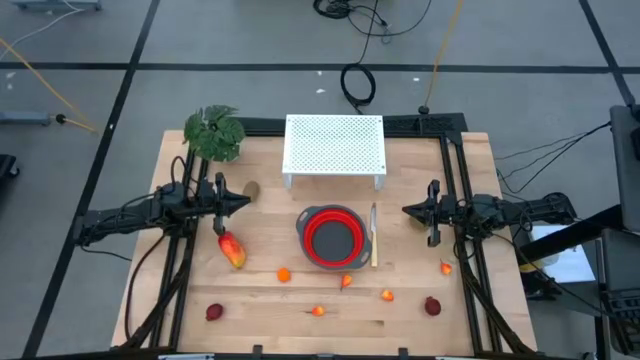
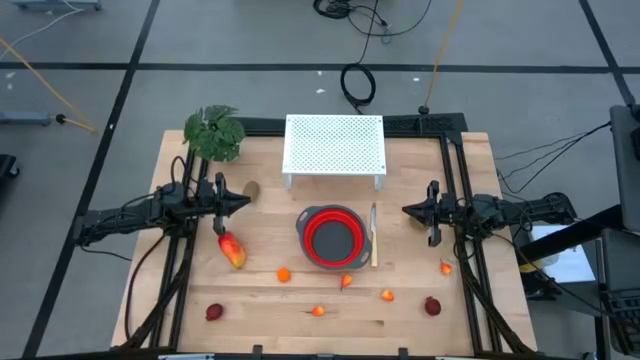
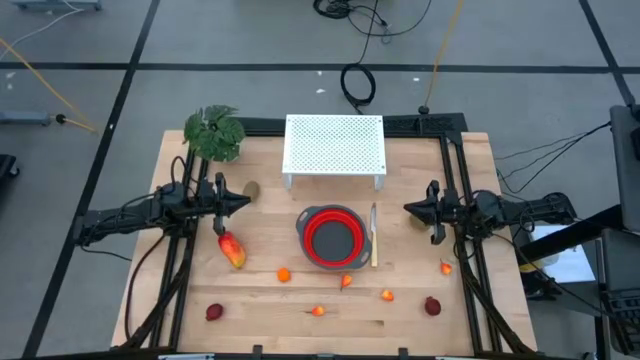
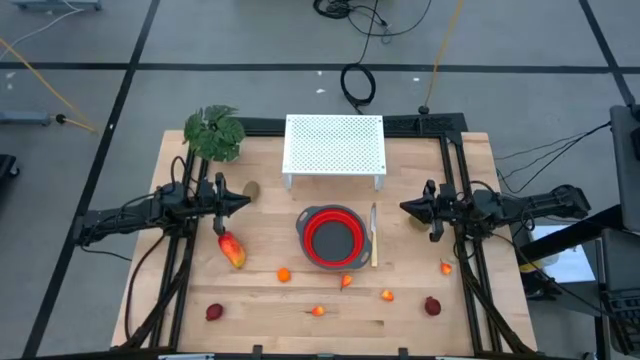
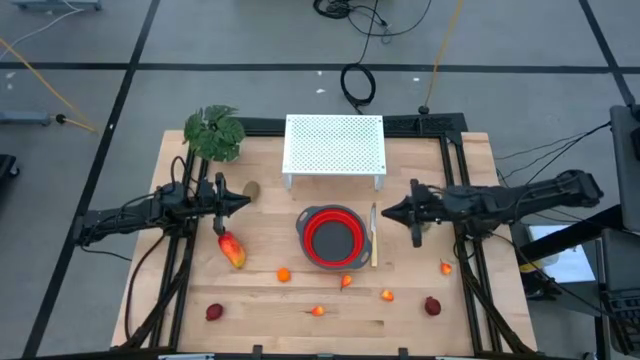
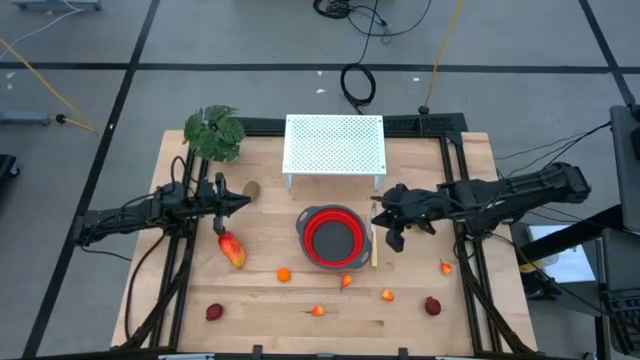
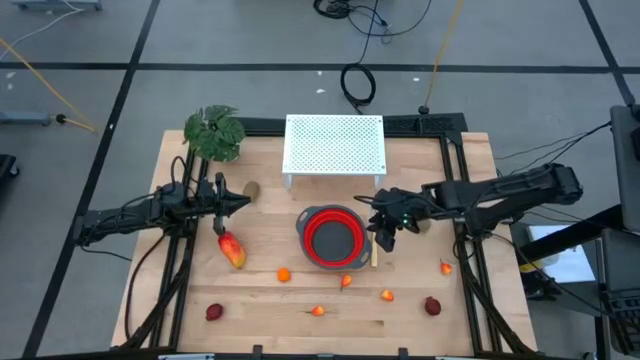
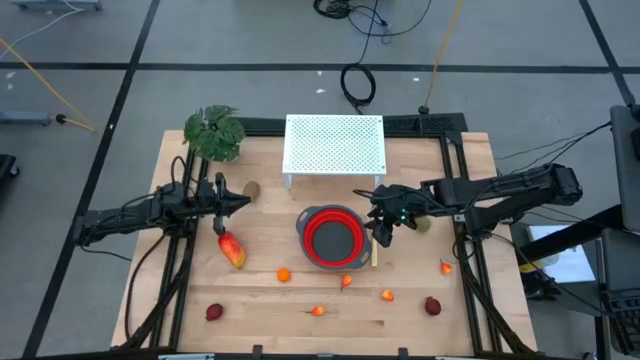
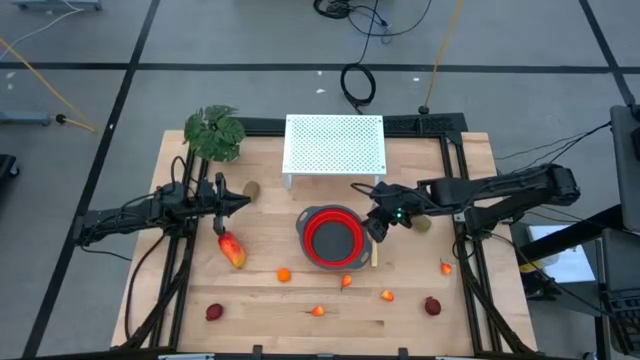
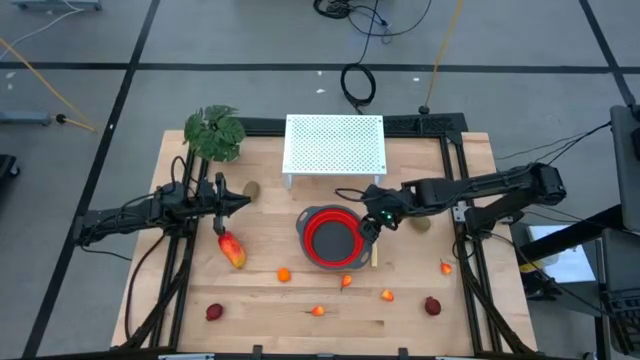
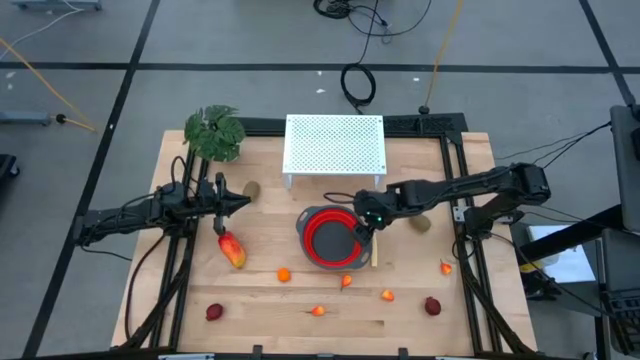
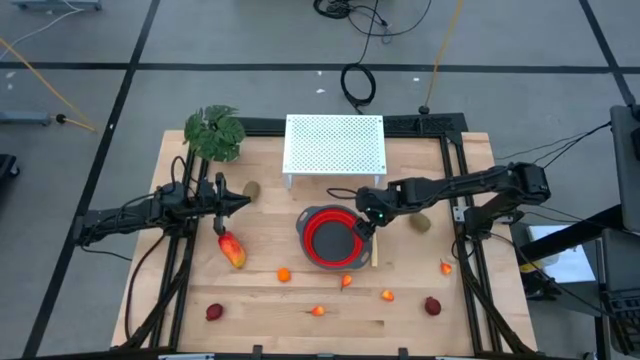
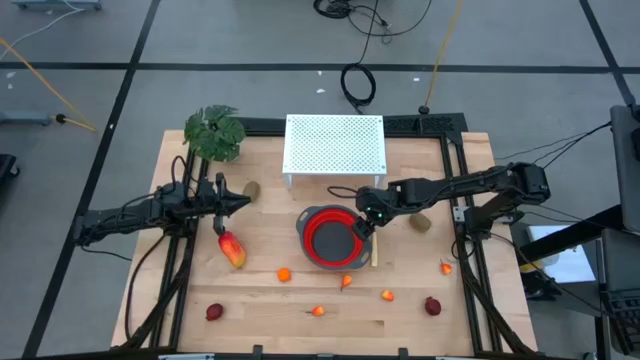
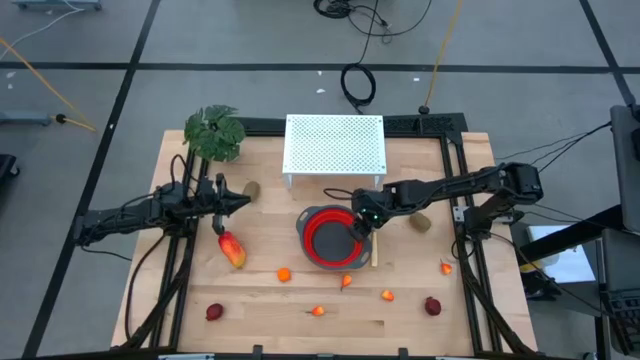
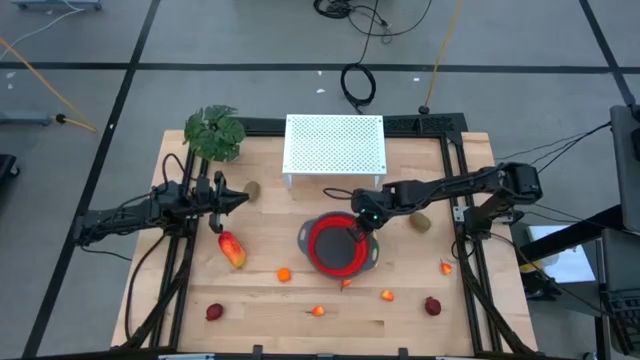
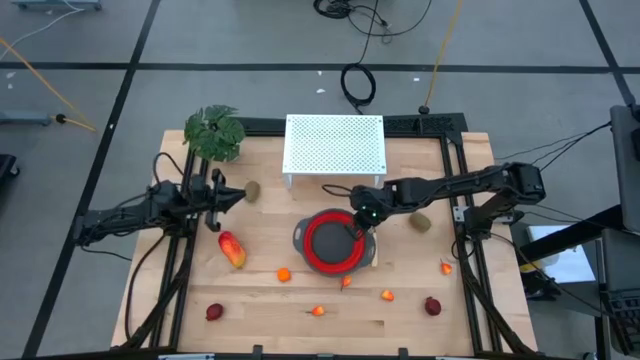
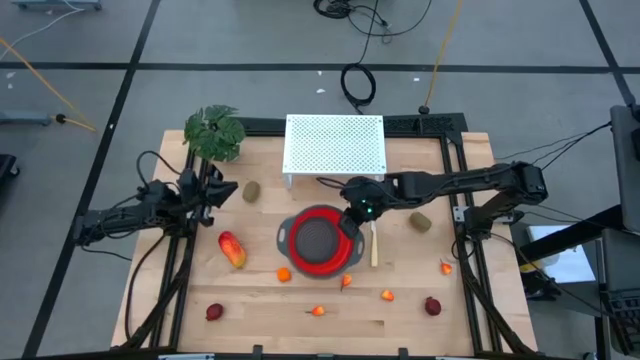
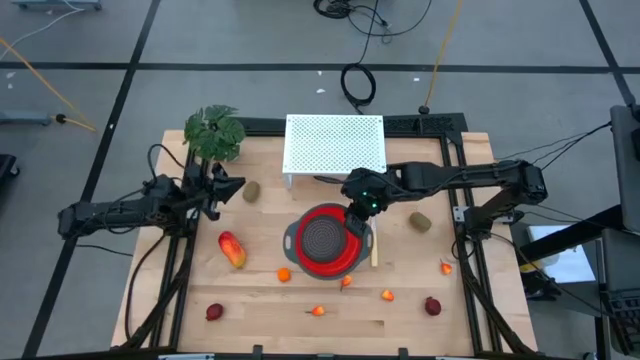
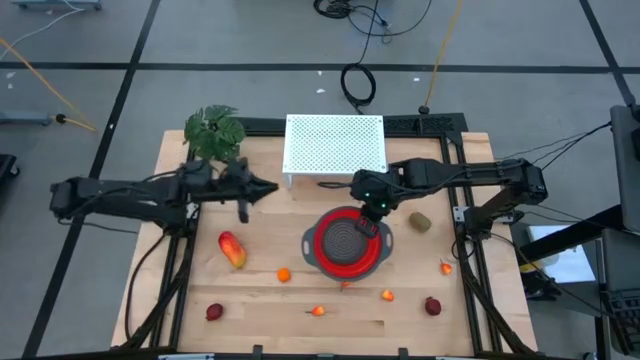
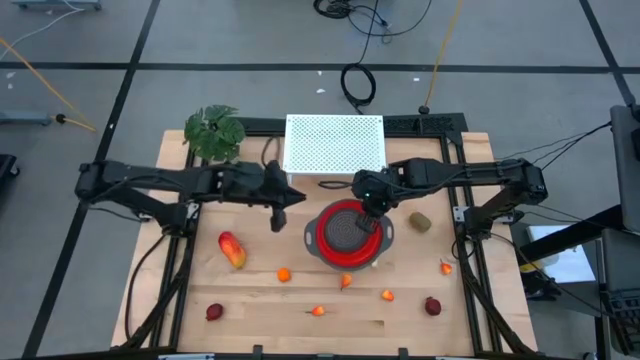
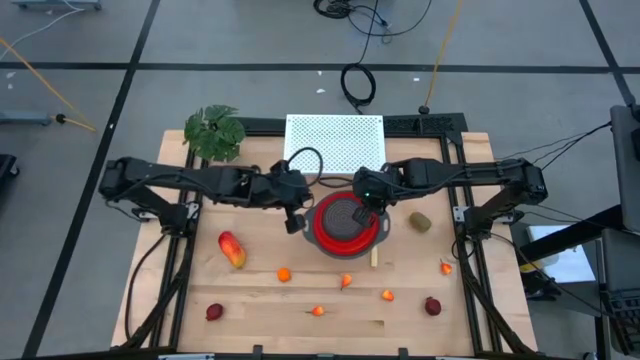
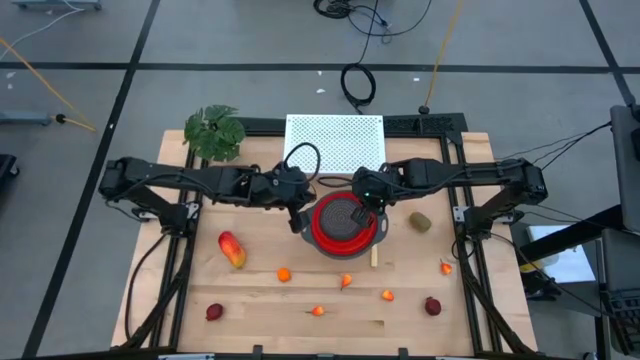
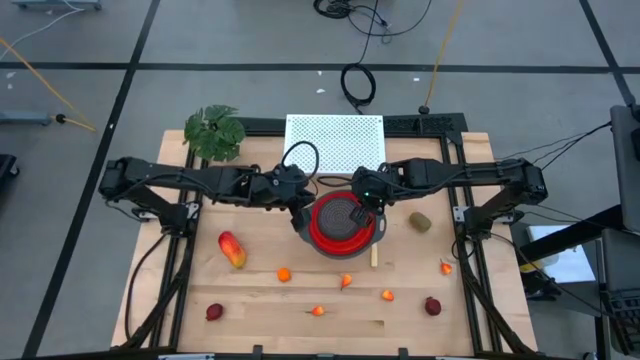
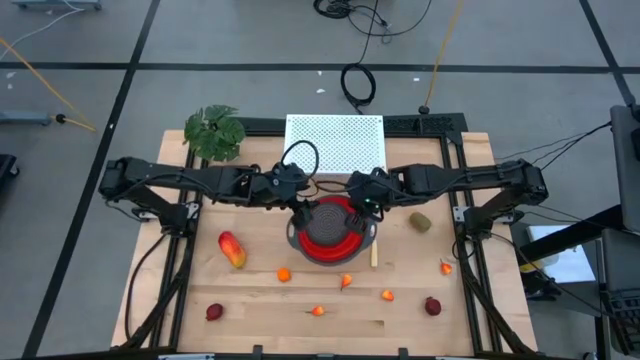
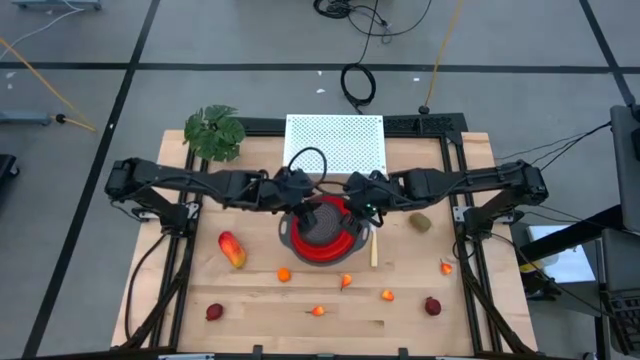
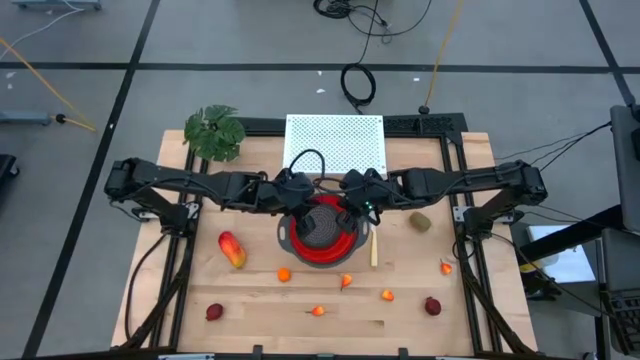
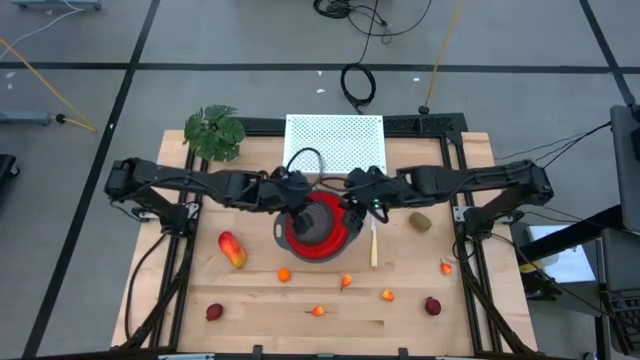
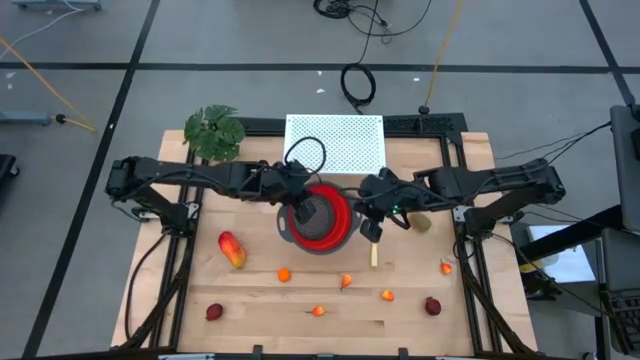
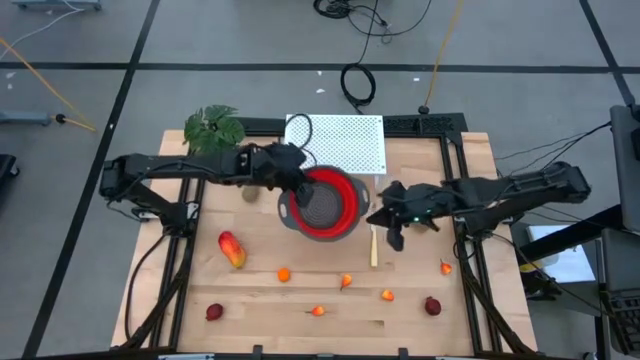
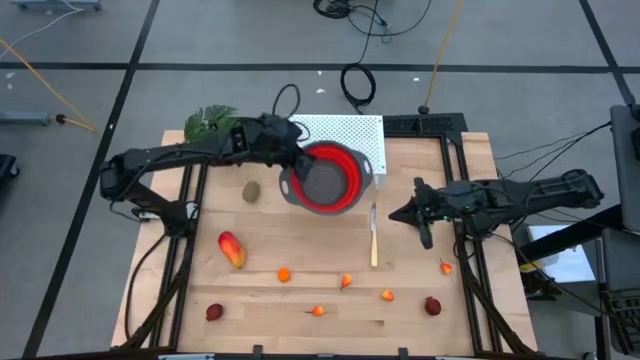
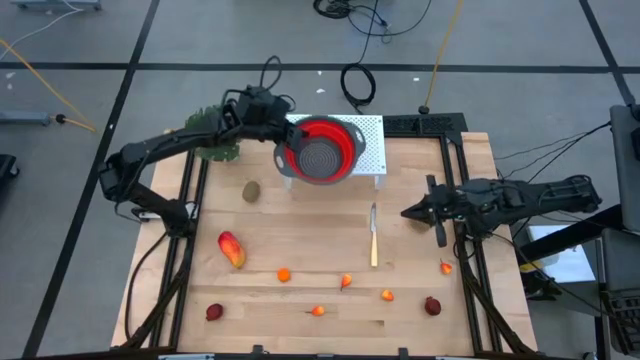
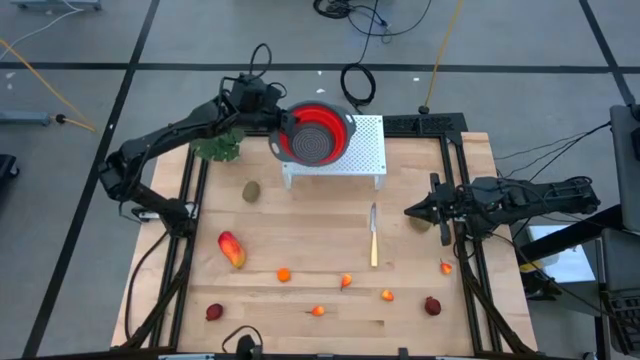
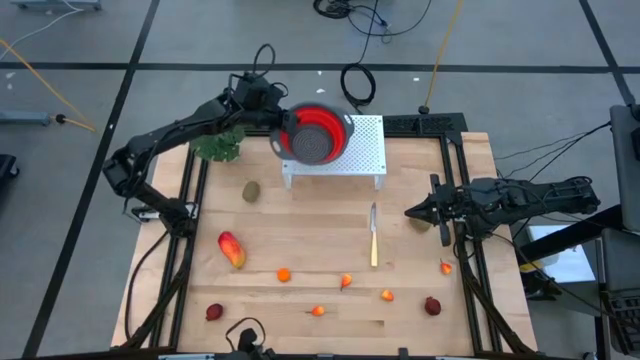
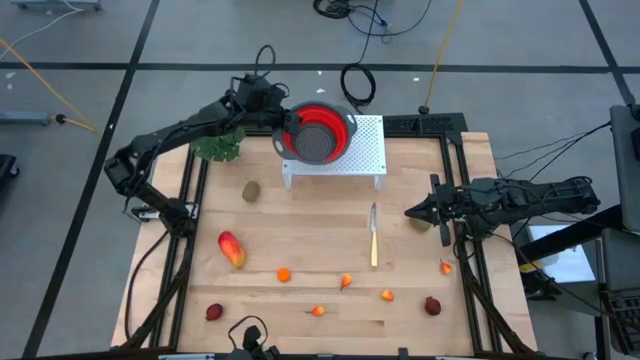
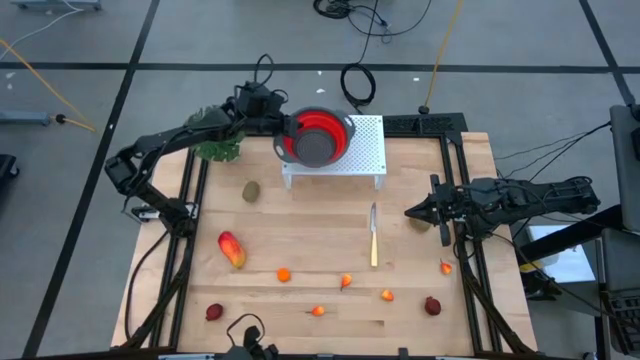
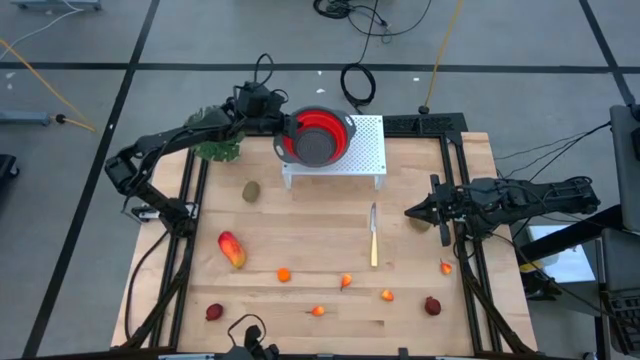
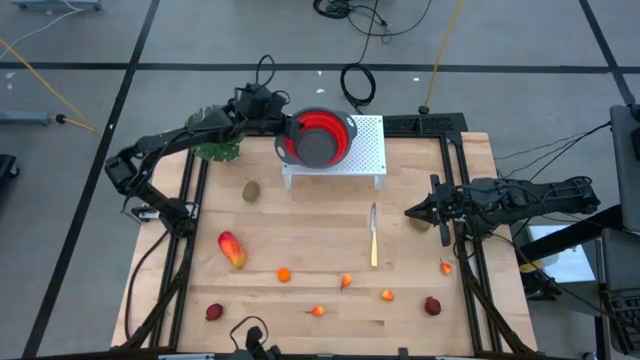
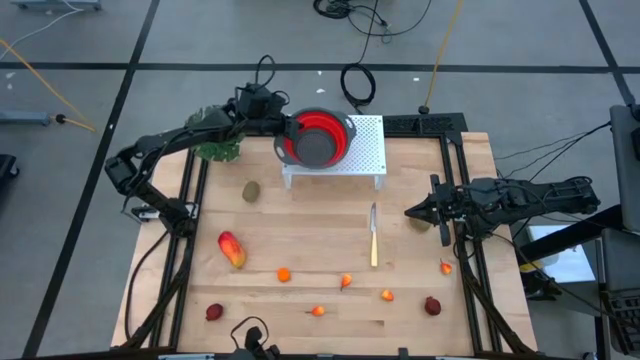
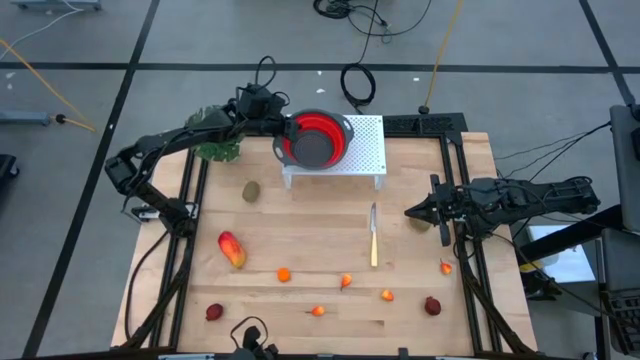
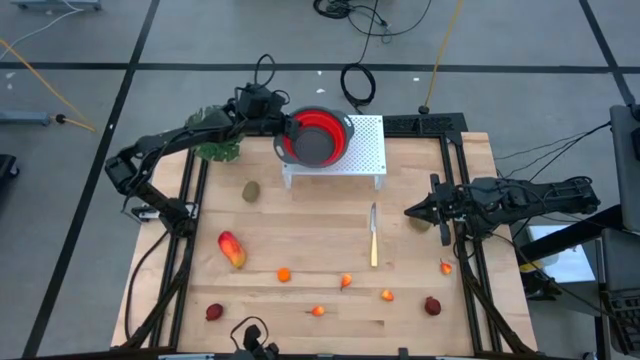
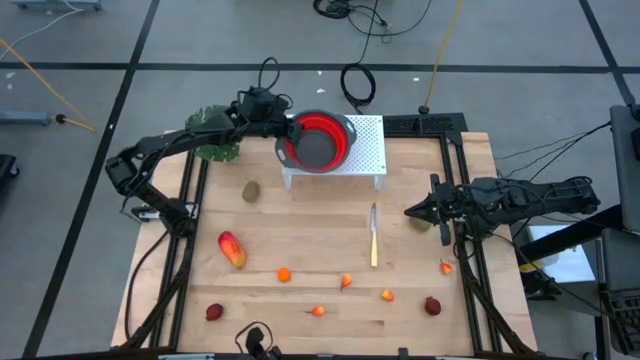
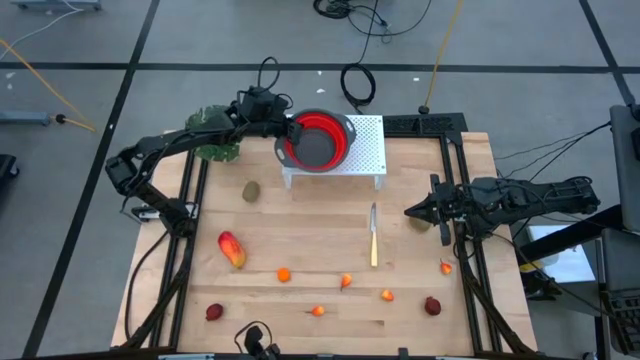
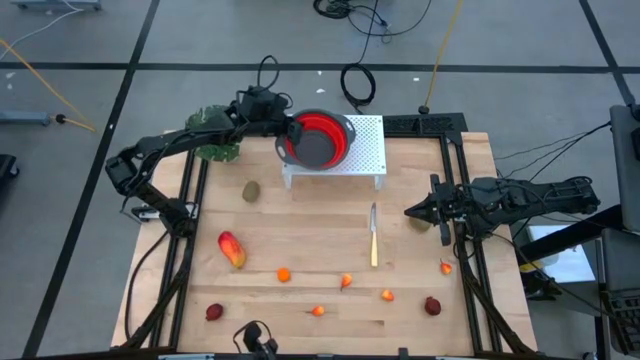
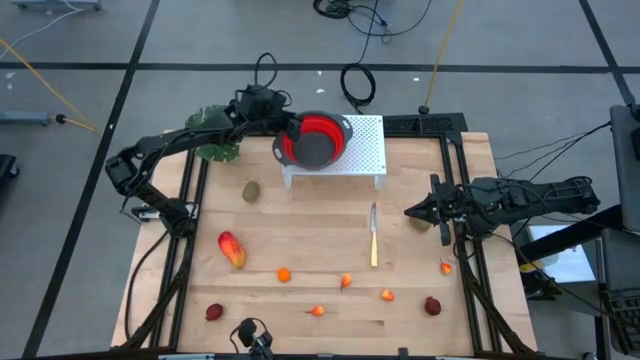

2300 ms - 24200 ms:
Task: Pick & Place Fruit
Put the red strainer bowl on the shelf
